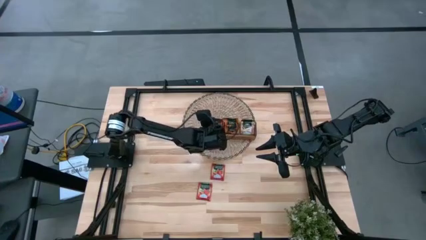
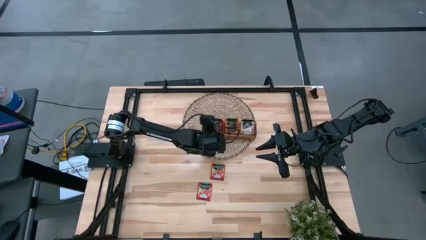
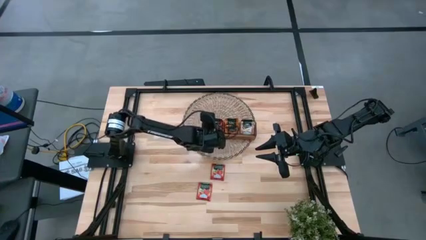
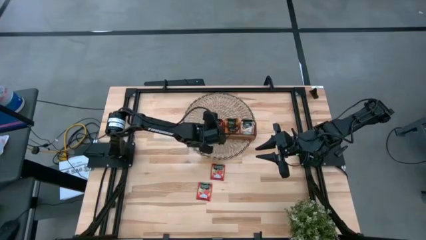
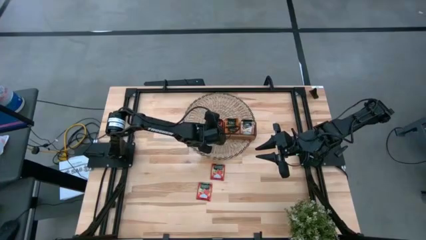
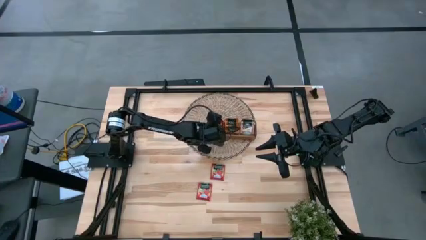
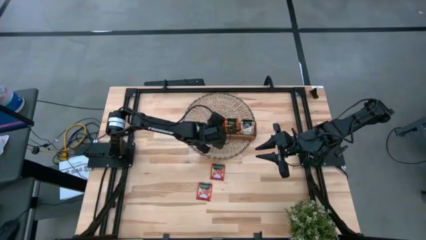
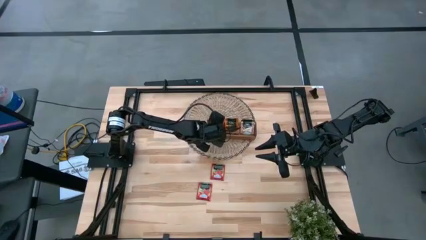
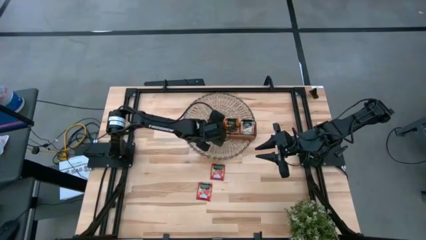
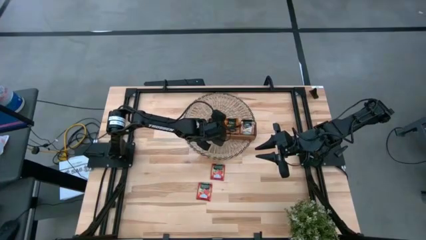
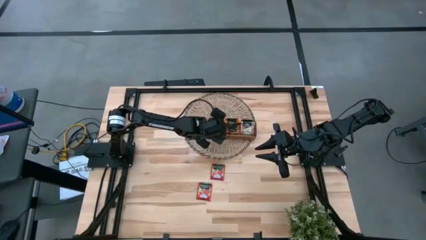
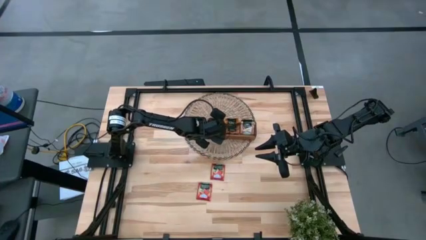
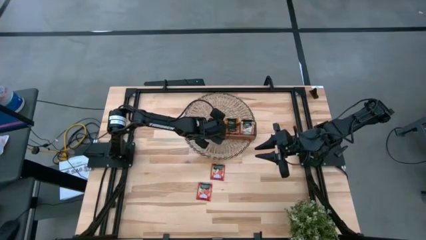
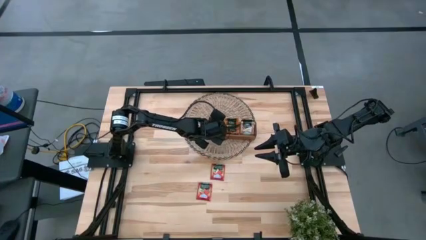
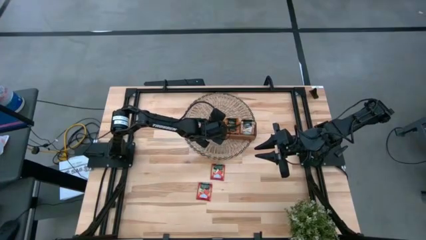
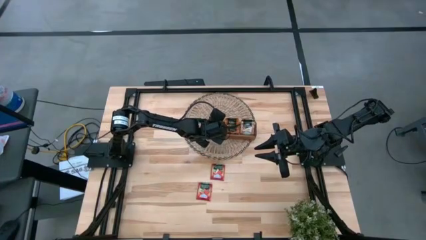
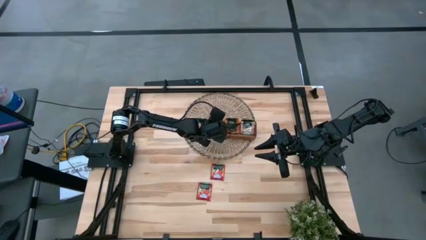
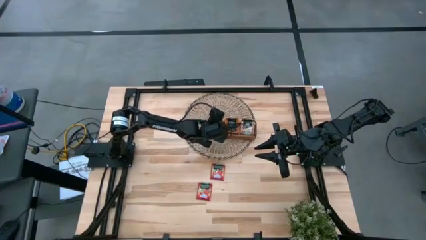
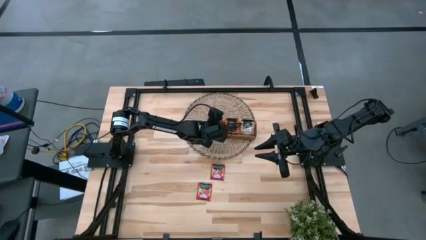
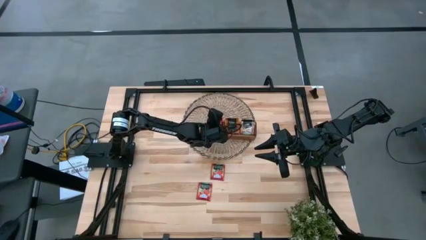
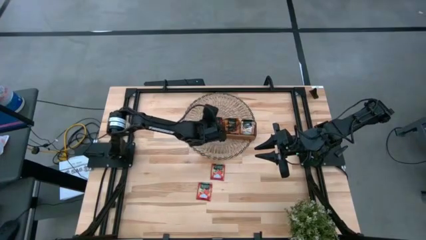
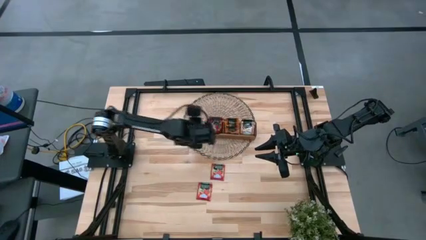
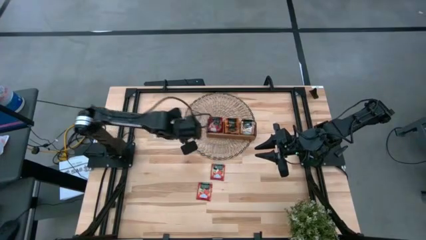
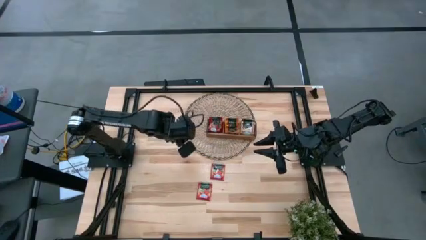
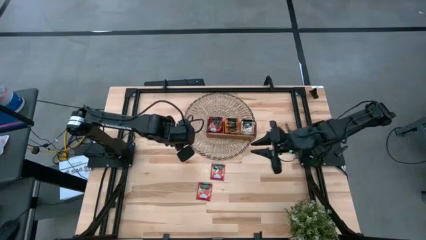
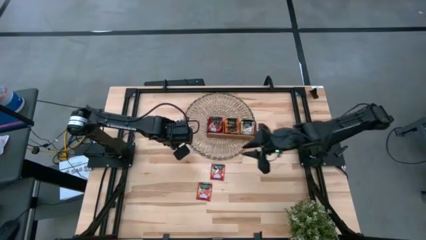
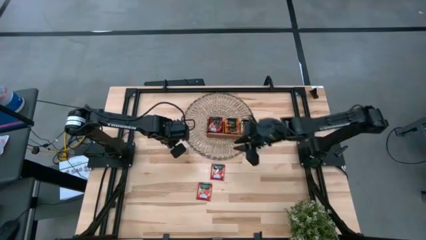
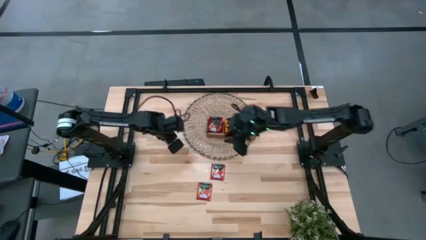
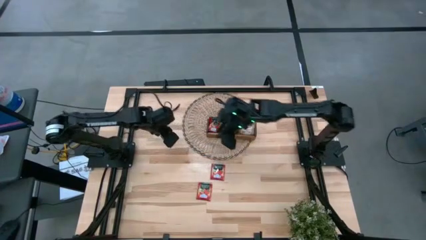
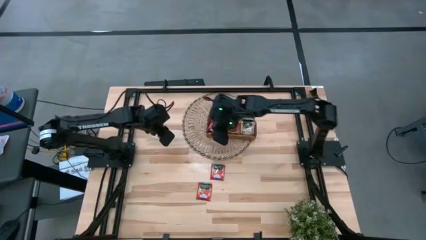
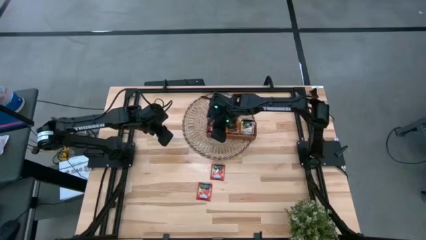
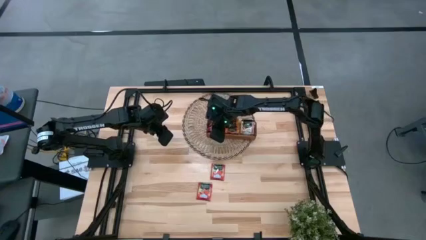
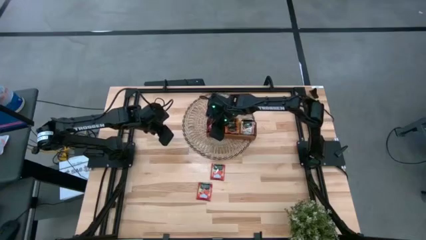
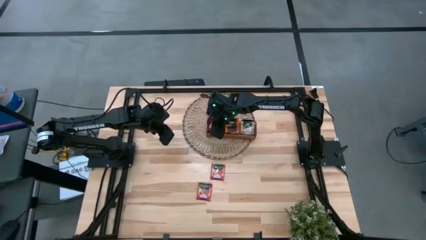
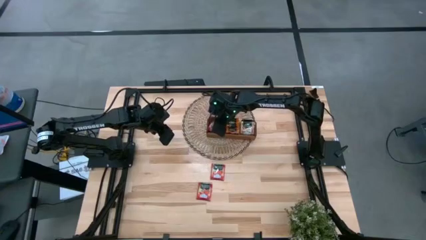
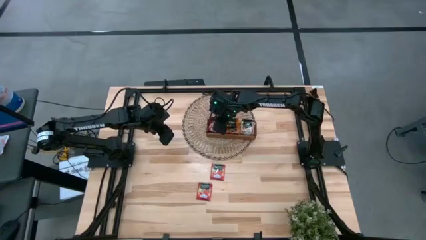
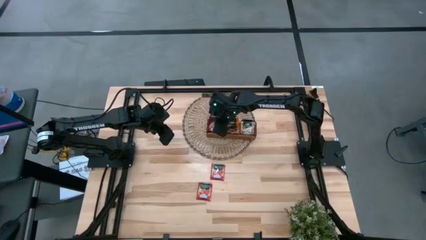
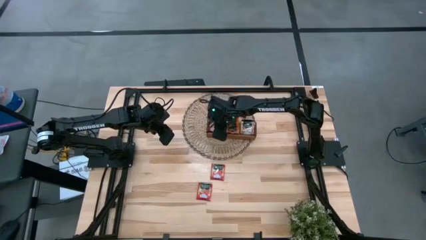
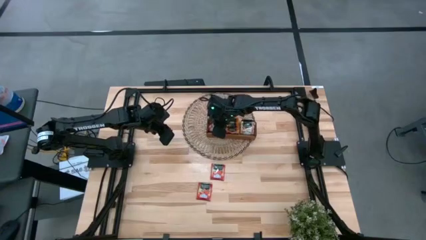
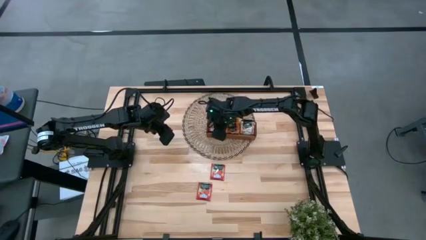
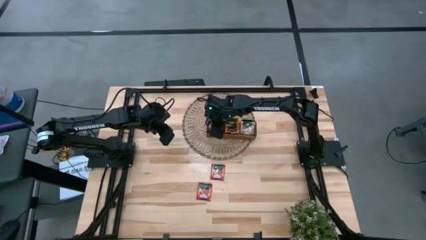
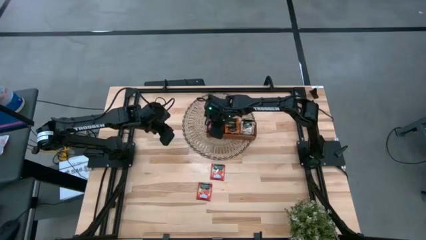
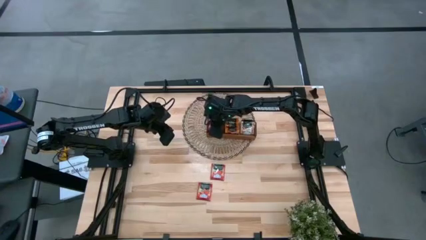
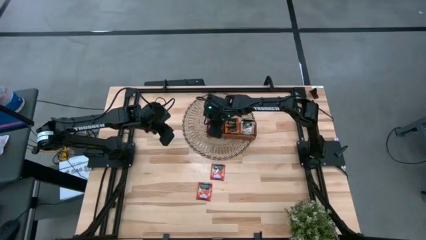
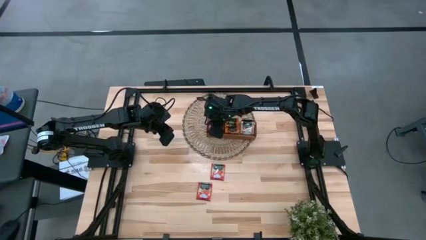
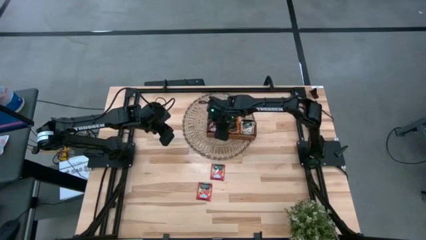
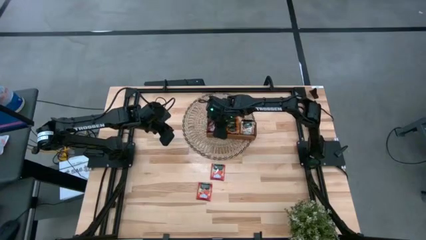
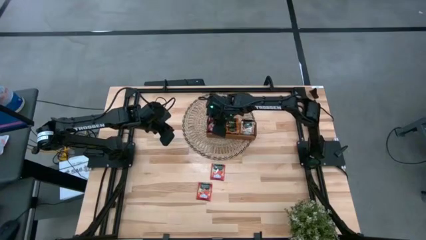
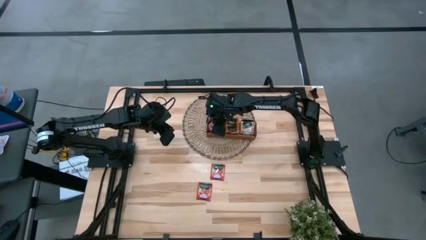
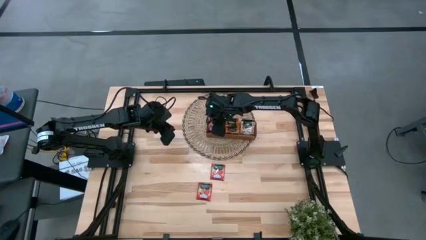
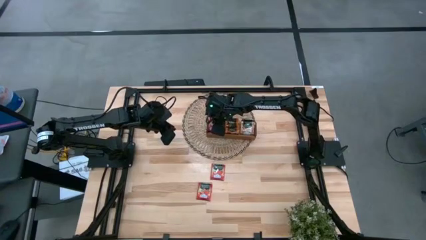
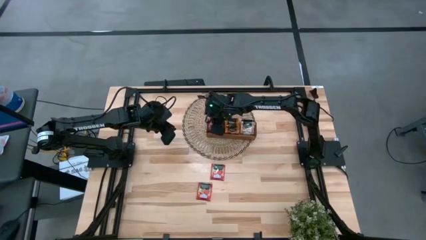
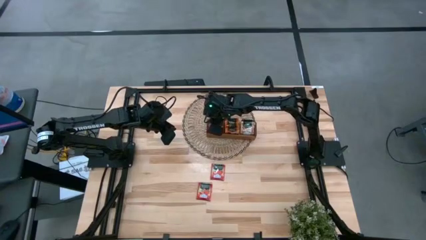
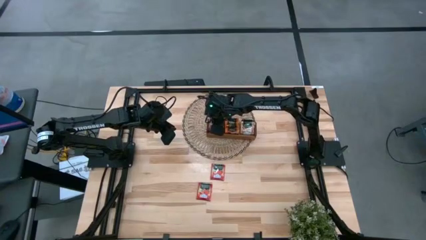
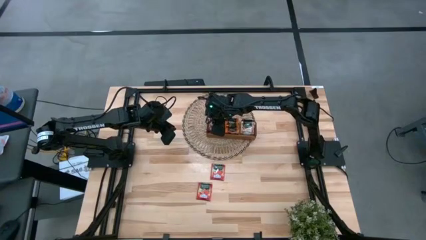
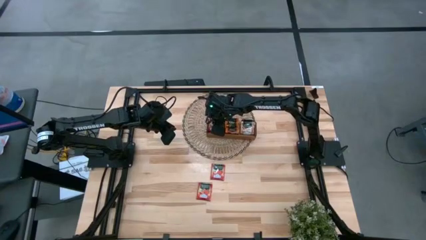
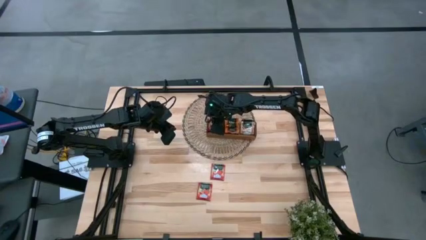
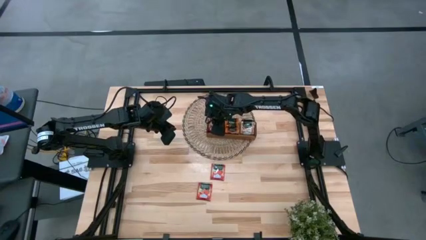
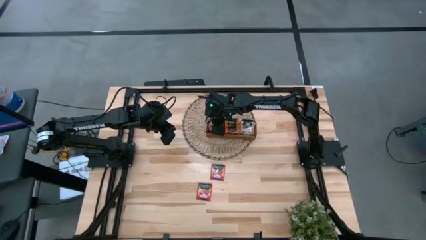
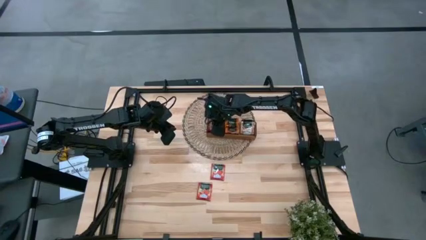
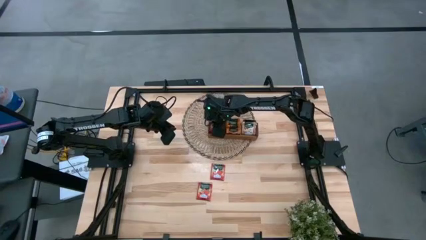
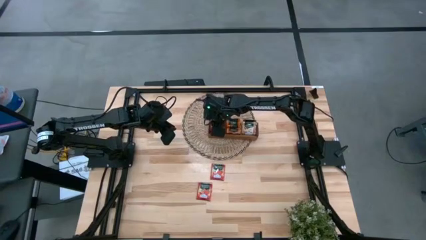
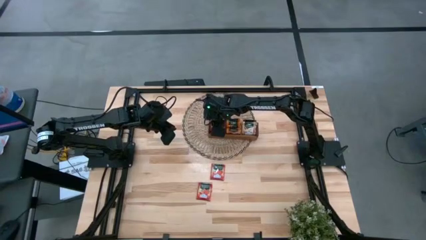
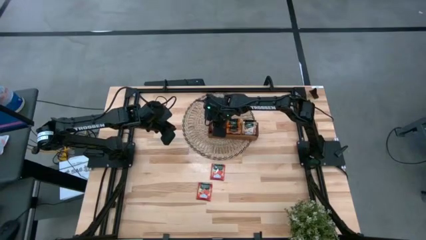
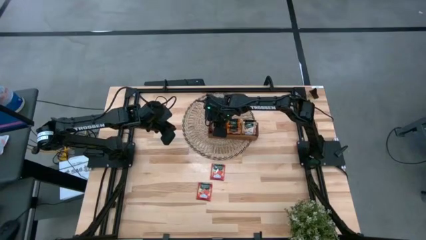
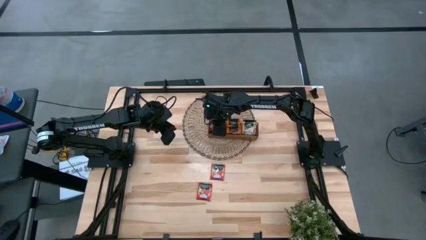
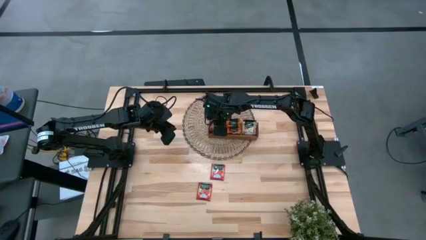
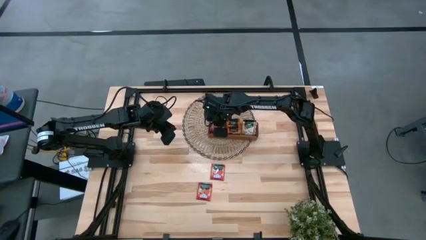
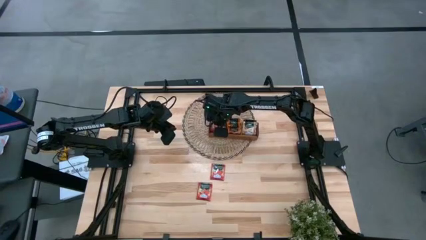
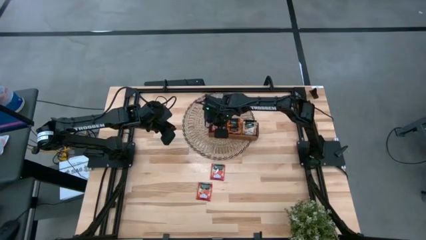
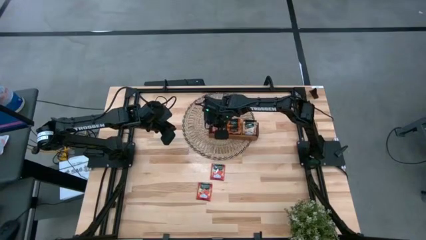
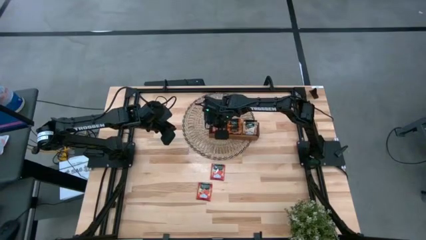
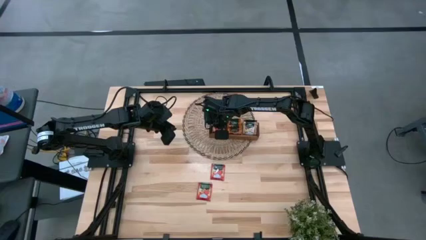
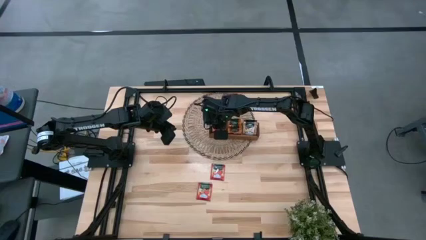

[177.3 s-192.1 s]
Task: Pick & Place Tea
Put the left red tea bag into the left slot of the wooden organizer
